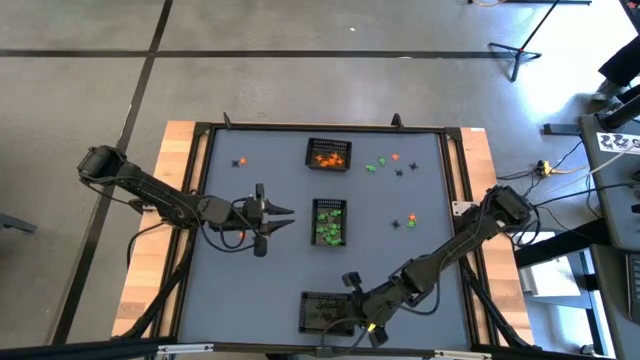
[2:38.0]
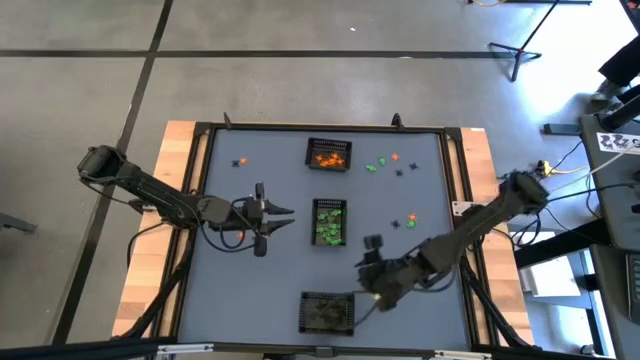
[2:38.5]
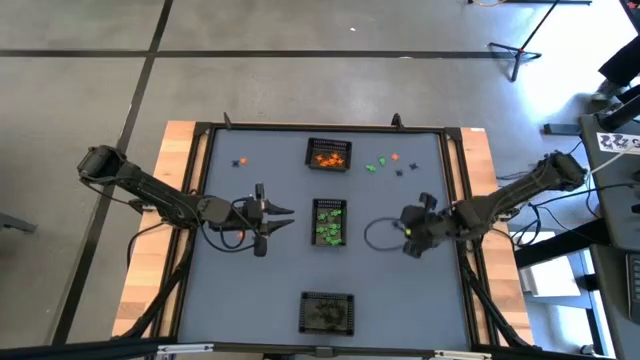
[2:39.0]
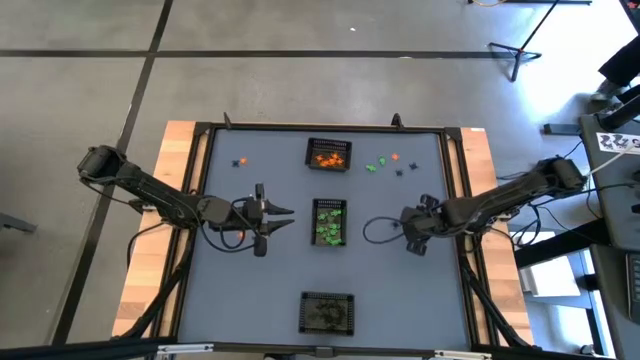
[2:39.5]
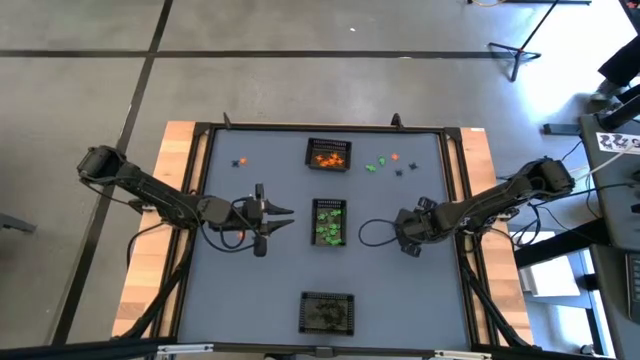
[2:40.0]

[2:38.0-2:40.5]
Task: Sort Halloween decoration
Put the green skeleton toy into the center black bin

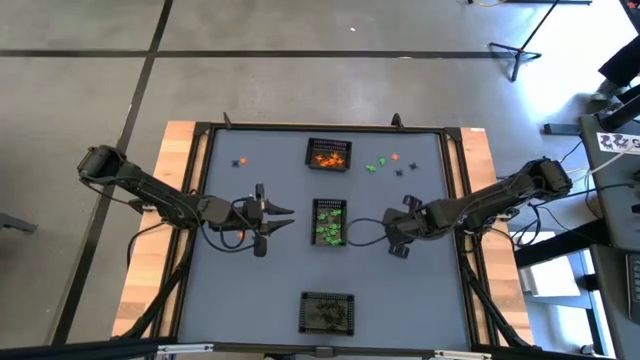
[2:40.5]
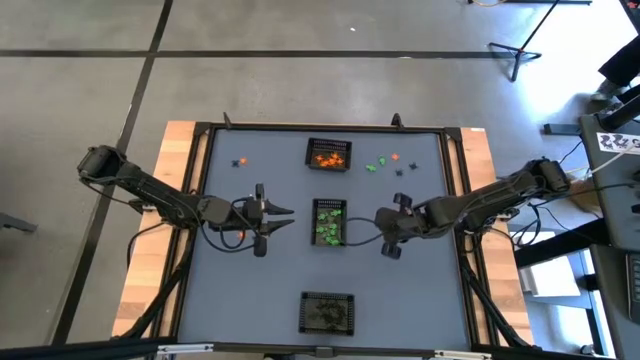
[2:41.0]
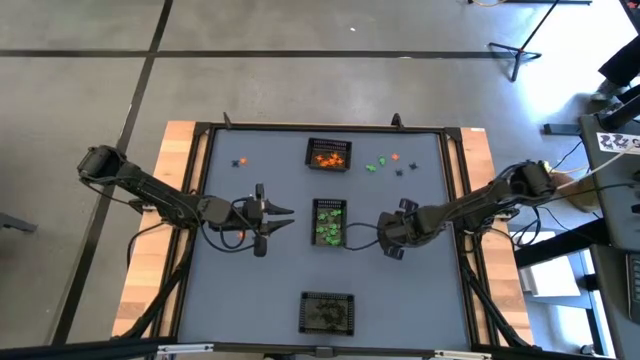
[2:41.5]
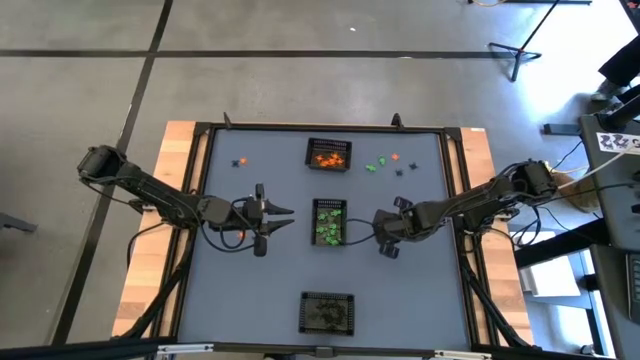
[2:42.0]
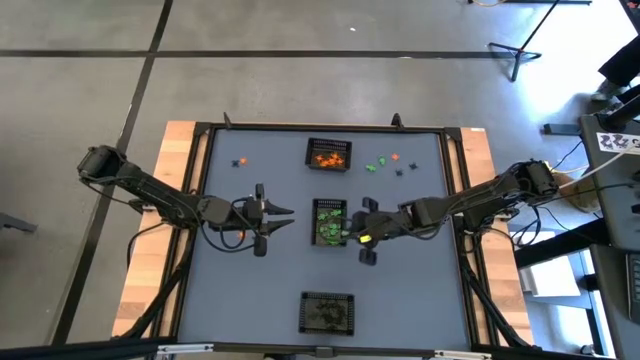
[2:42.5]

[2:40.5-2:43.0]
Put the green skeleton toy into the center black bin

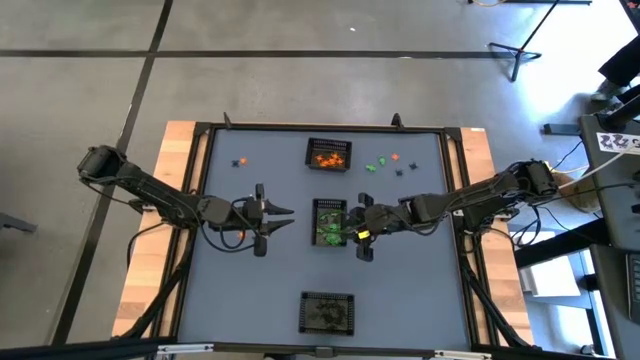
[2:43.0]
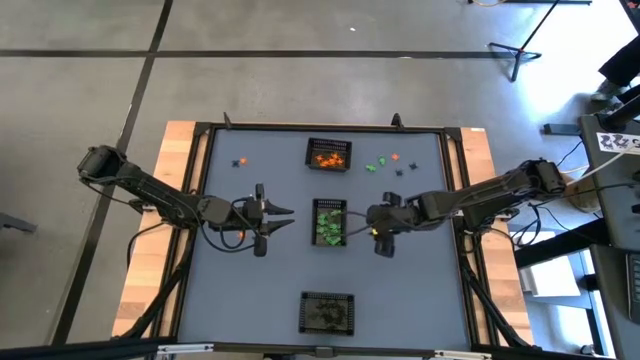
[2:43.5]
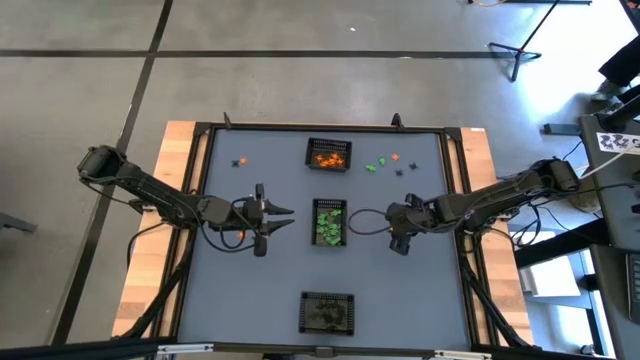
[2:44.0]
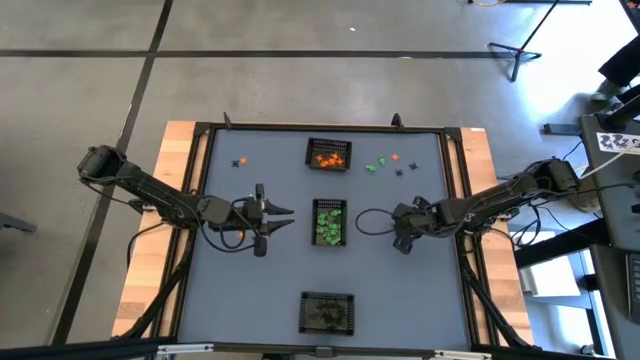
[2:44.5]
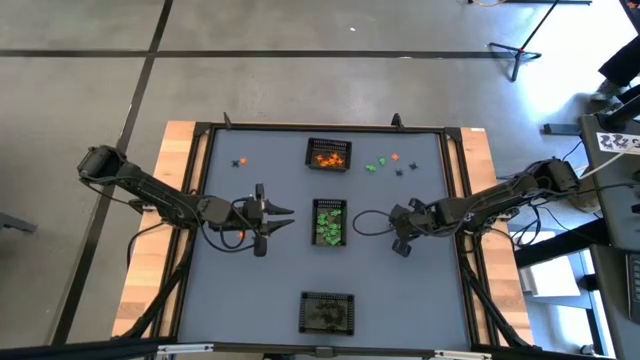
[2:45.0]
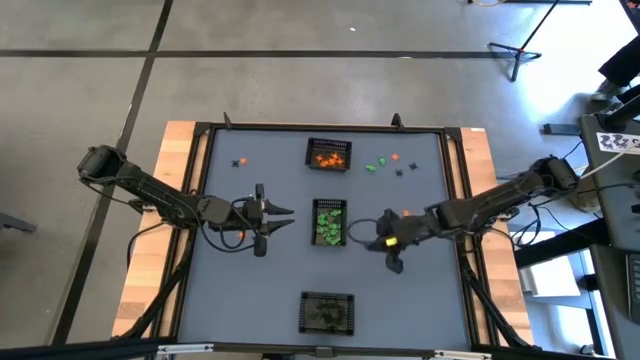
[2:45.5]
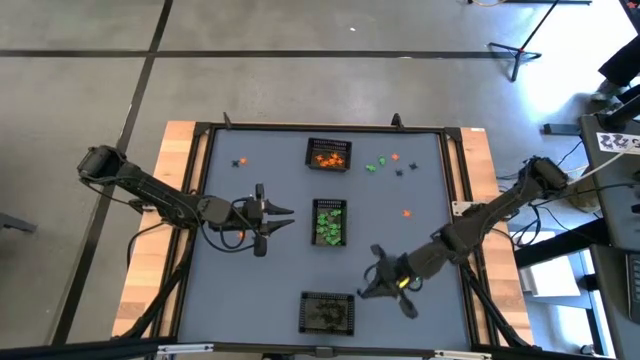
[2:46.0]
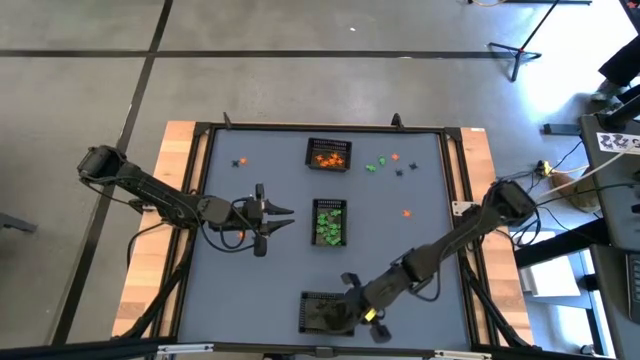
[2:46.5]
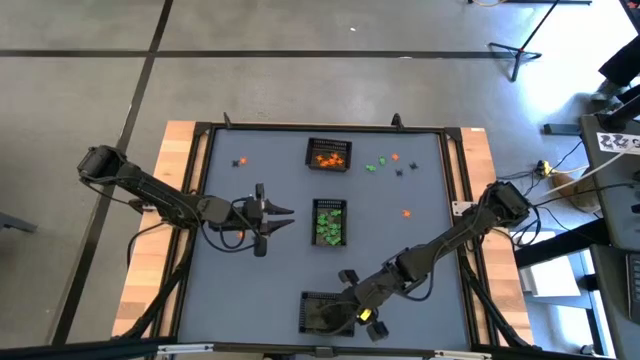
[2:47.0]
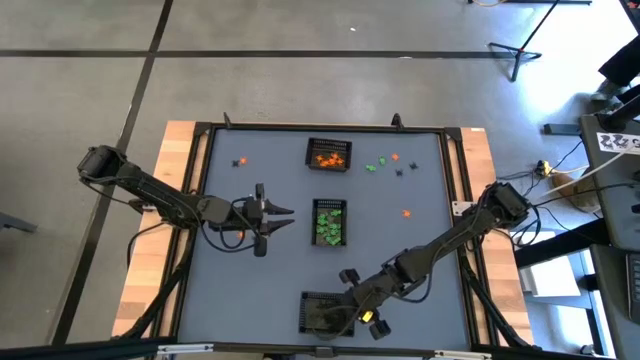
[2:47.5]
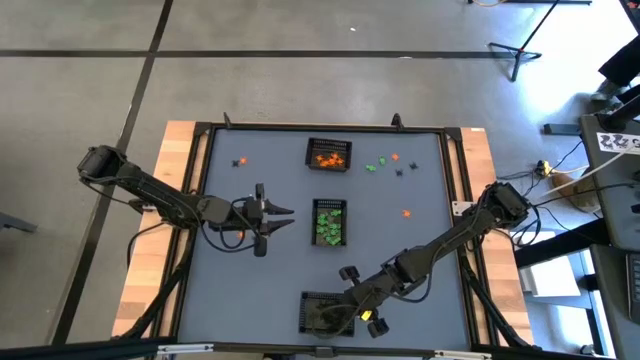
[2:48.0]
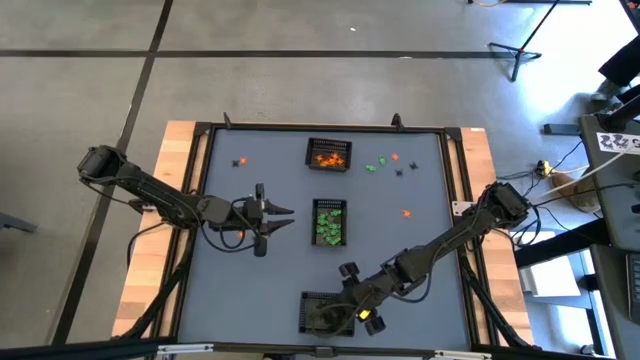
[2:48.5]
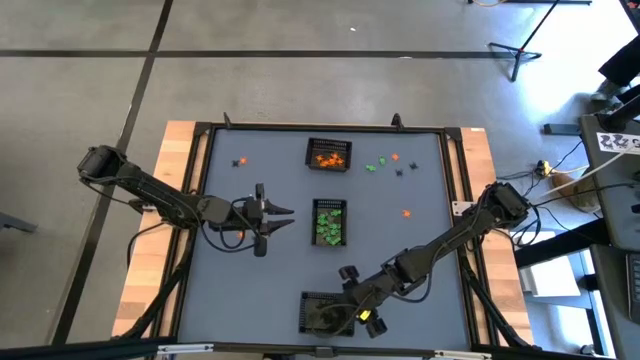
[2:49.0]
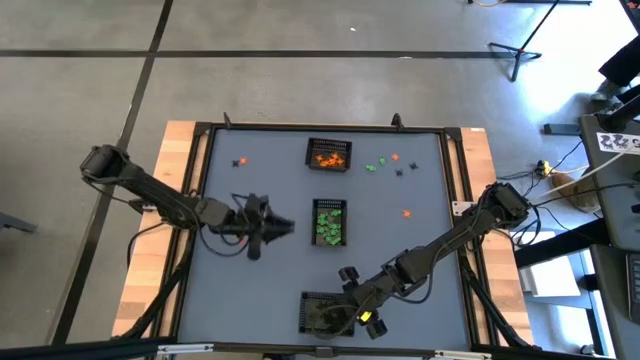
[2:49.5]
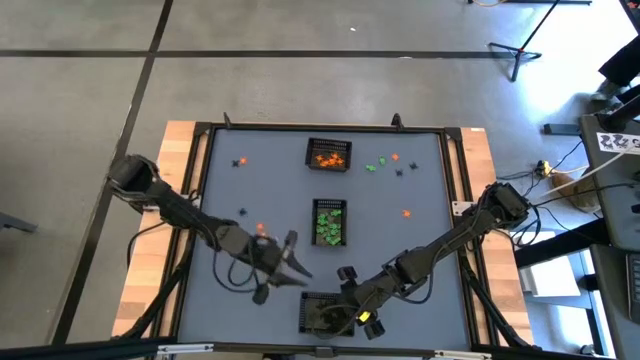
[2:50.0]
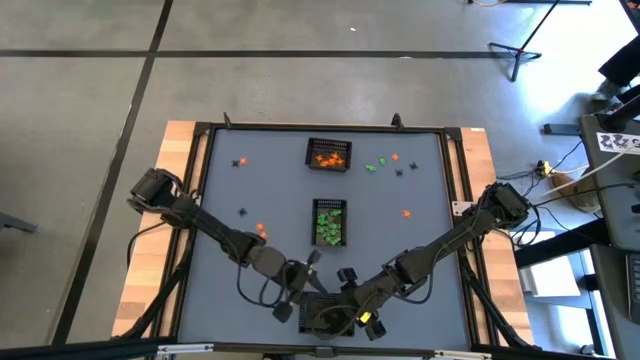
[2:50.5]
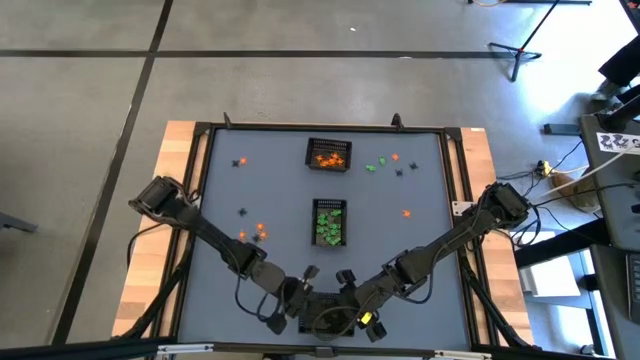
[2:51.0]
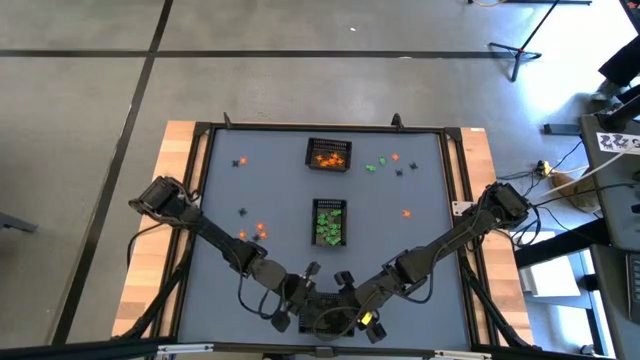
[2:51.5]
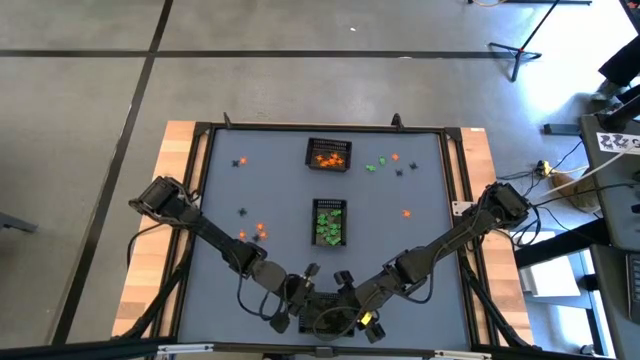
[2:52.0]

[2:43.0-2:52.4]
Put the black spider toy into the bottom black bin

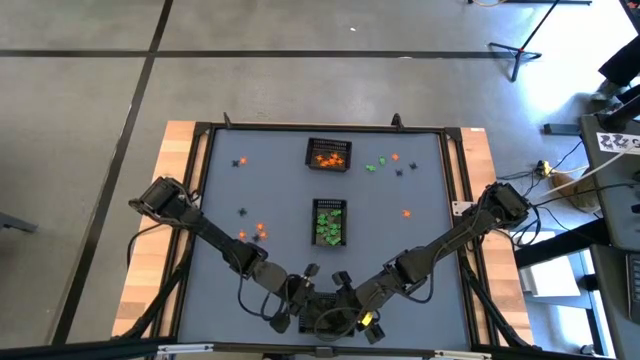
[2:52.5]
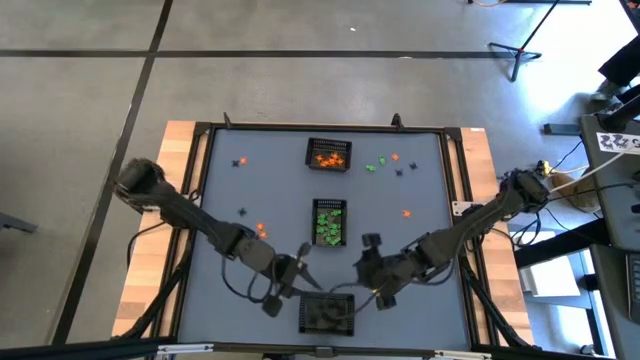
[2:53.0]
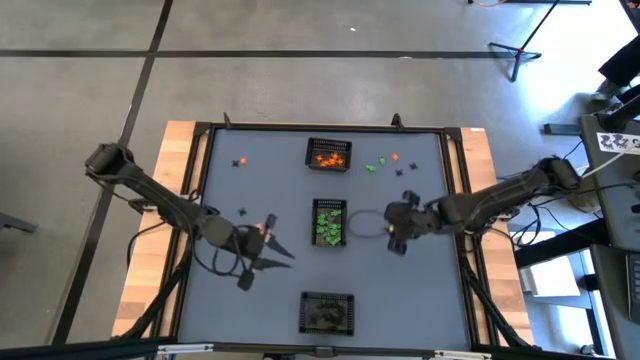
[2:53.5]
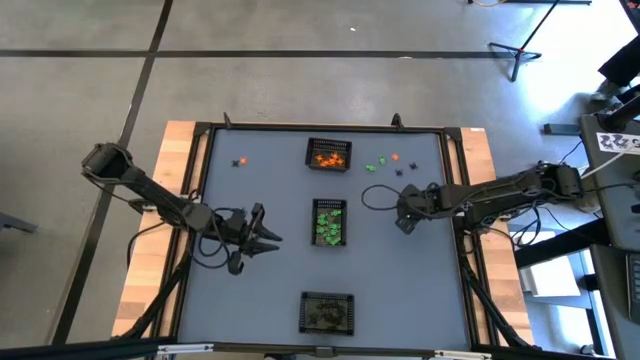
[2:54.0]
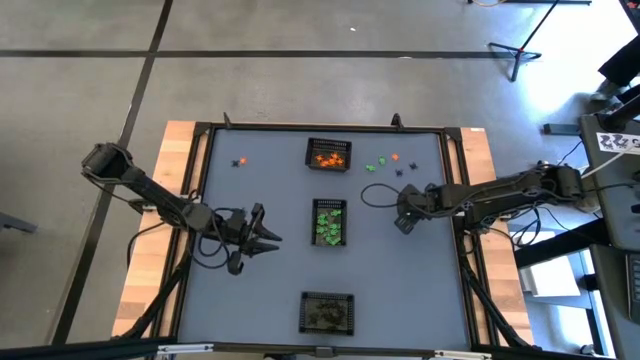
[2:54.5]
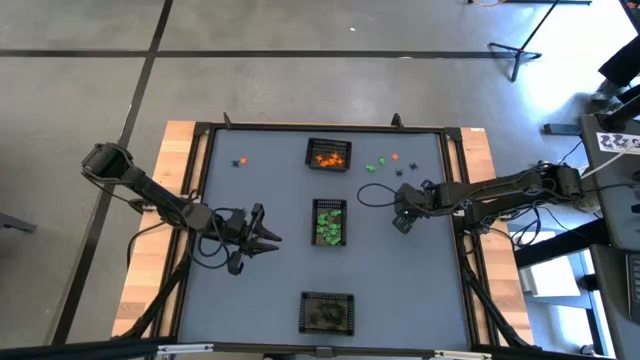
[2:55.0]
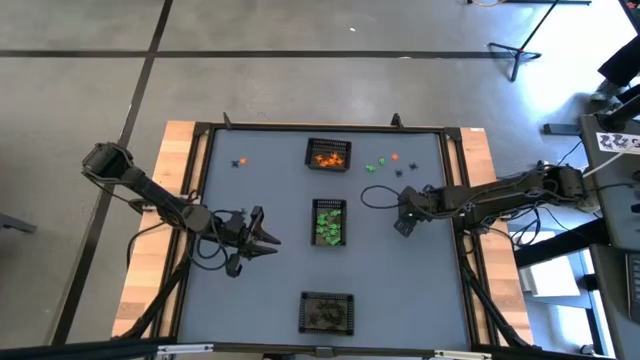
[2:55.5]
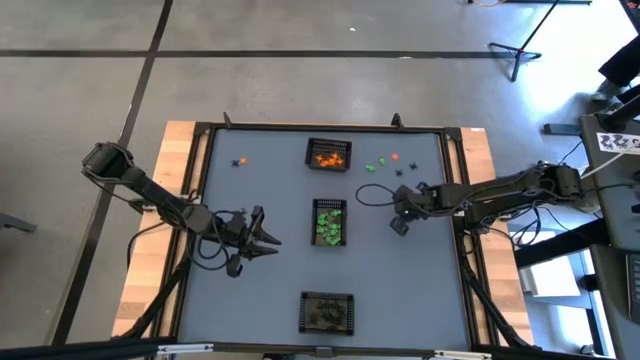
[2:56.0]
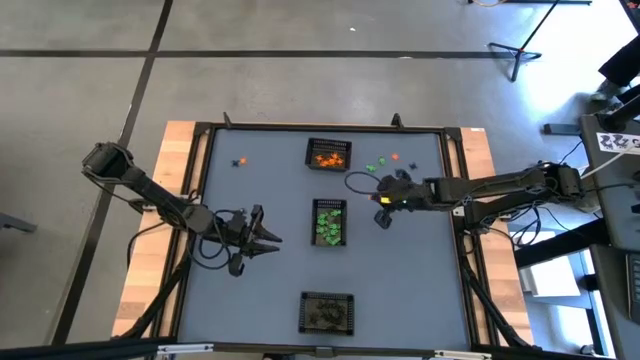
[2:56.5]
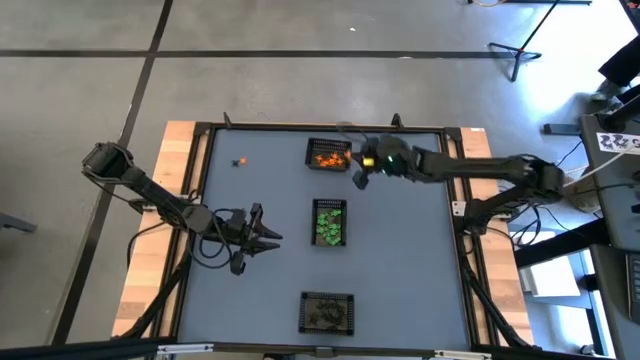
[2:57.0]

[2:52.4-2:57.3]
Put the orange spider toy into the top black bin

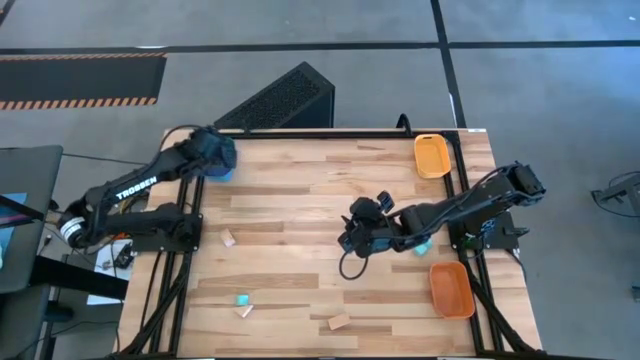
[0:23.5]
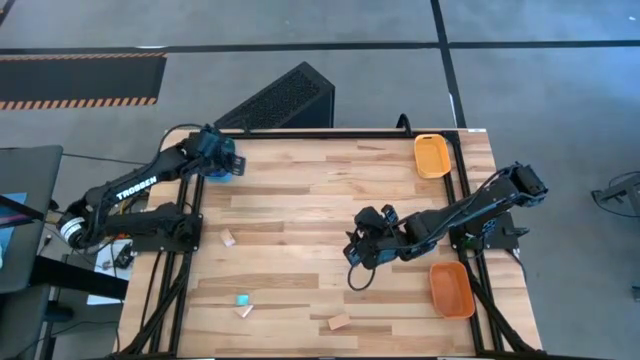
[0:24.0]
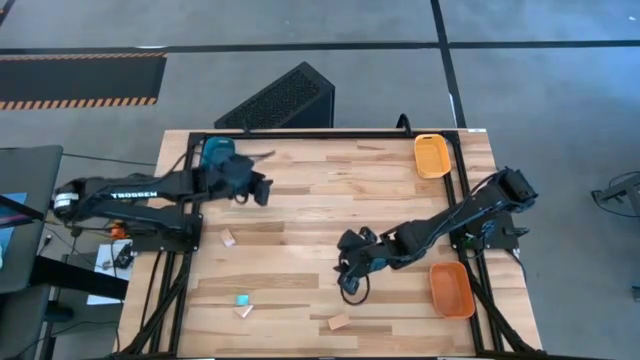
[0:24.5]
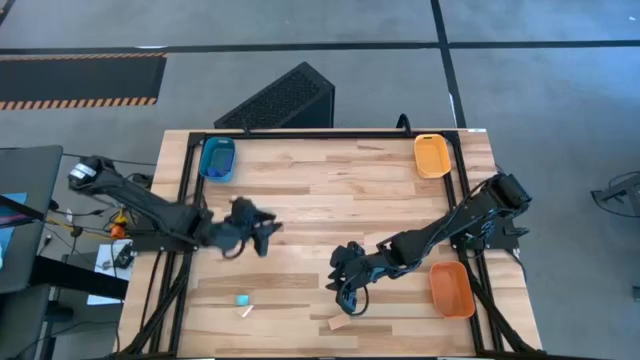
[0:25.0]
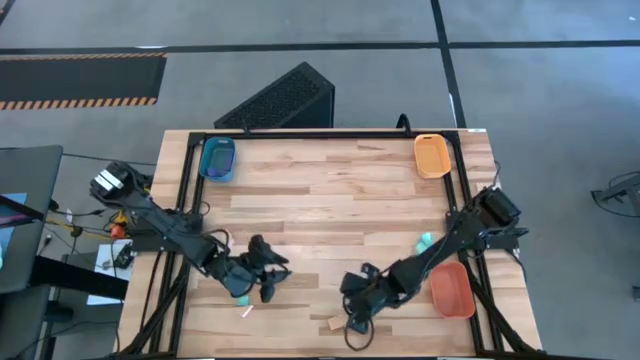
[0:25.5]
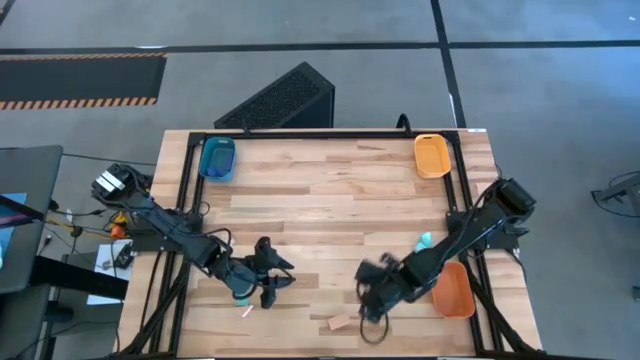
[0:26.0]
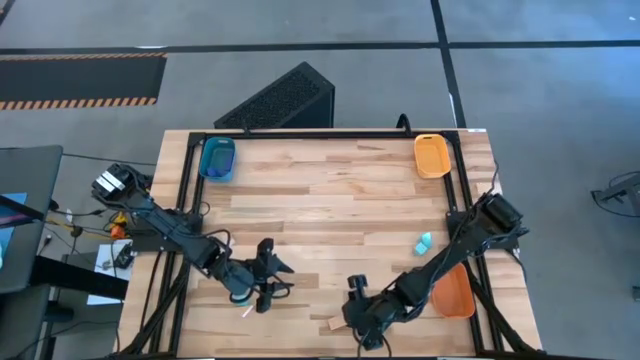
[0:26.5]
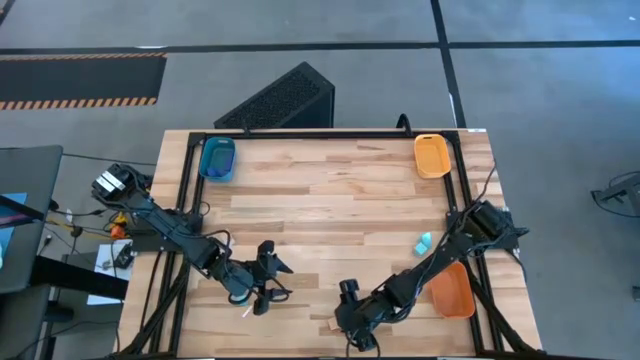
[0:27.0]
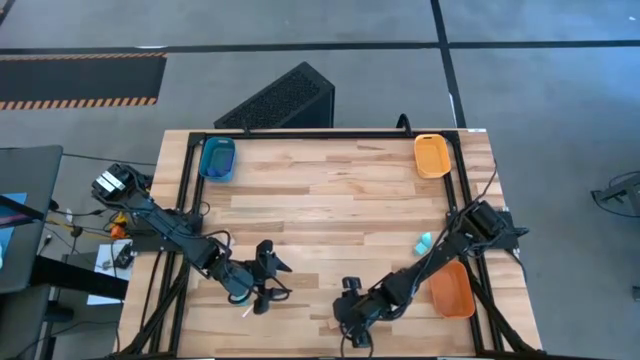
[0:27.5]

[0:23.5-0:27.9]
Task: Sort & place blocks by color
Put the bottom right brown block into the yellow bin
